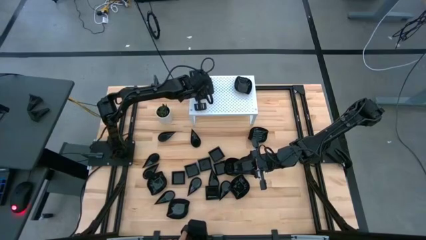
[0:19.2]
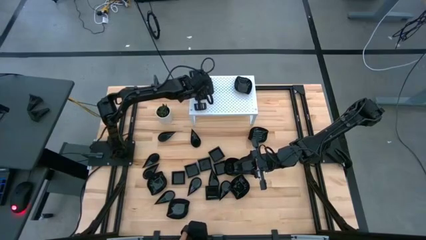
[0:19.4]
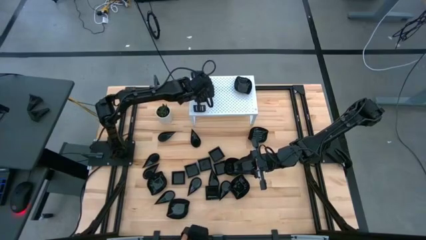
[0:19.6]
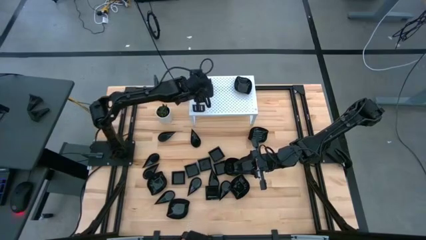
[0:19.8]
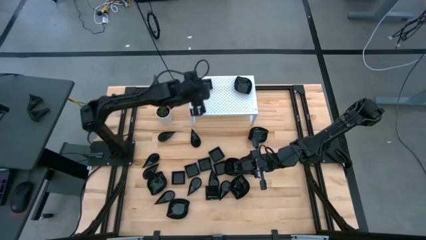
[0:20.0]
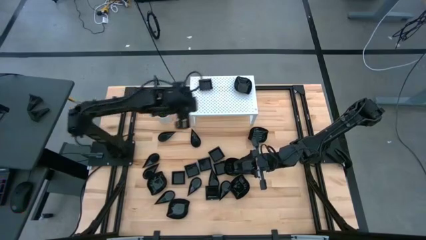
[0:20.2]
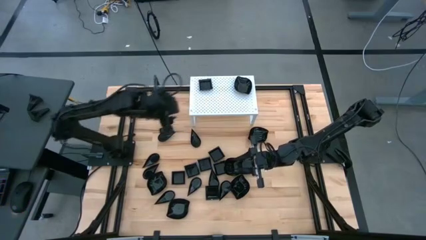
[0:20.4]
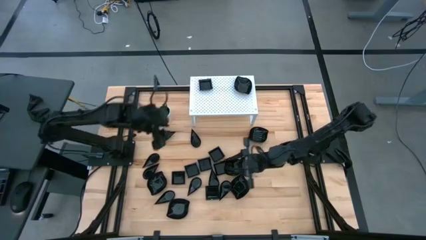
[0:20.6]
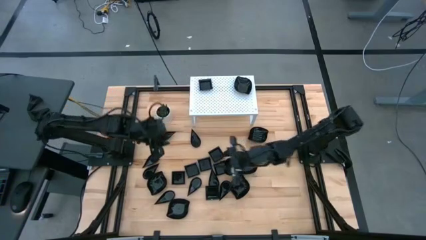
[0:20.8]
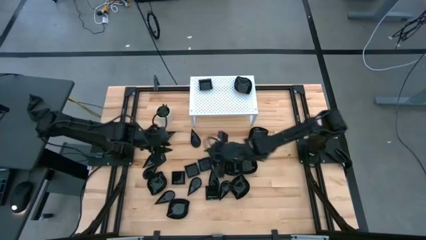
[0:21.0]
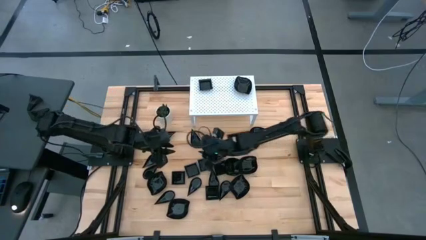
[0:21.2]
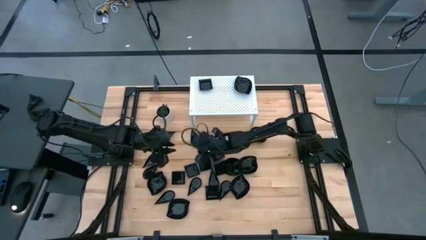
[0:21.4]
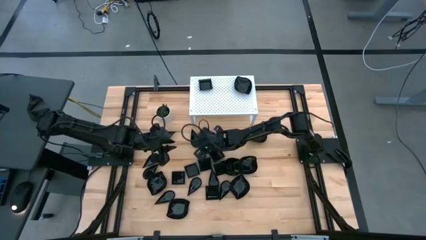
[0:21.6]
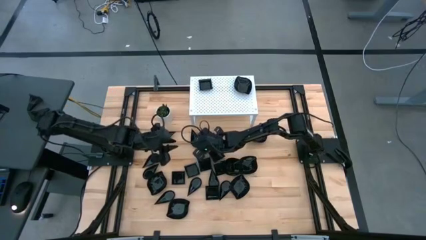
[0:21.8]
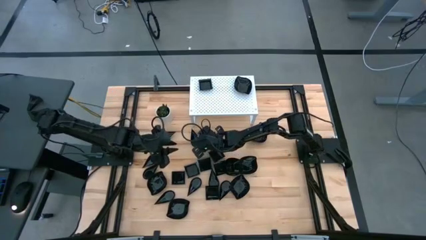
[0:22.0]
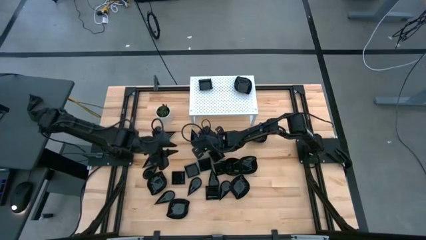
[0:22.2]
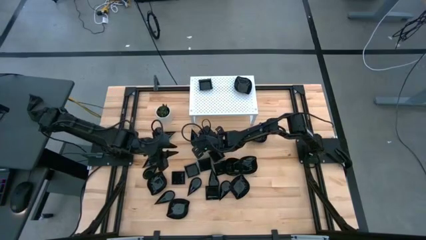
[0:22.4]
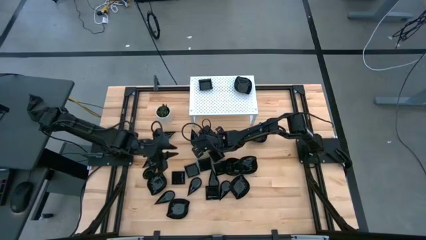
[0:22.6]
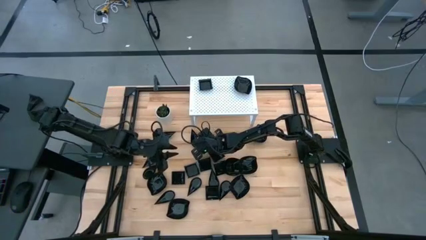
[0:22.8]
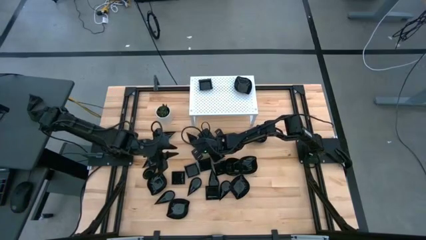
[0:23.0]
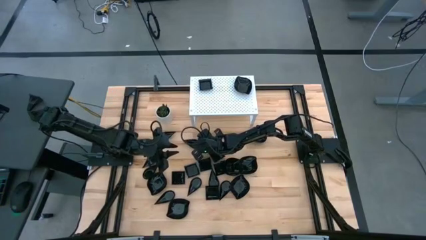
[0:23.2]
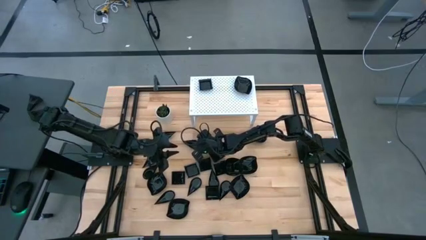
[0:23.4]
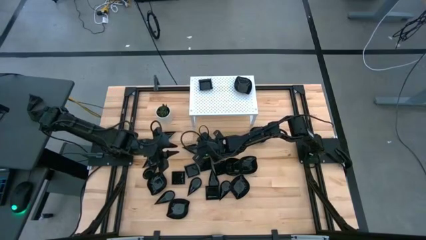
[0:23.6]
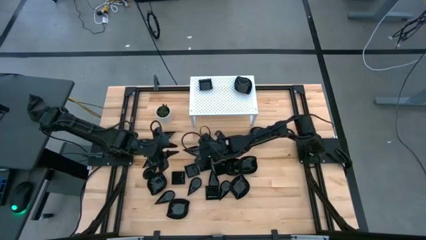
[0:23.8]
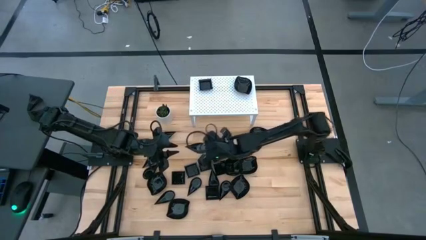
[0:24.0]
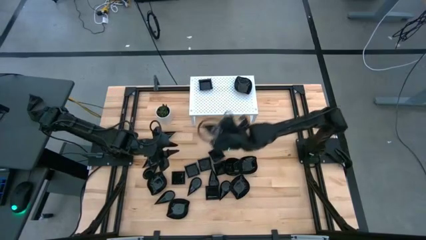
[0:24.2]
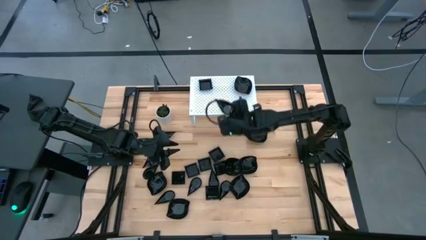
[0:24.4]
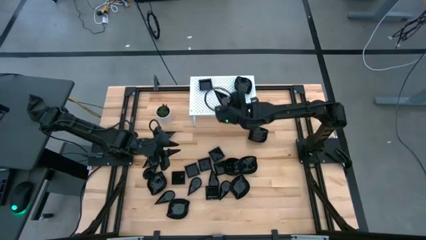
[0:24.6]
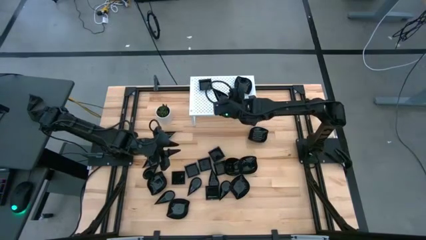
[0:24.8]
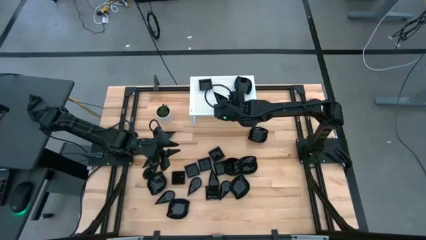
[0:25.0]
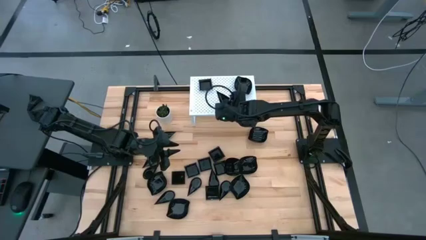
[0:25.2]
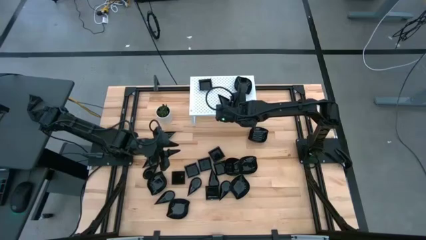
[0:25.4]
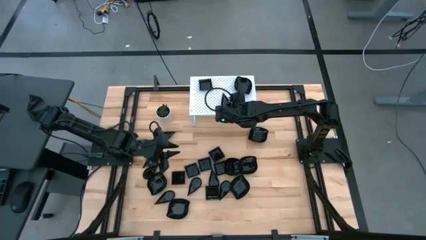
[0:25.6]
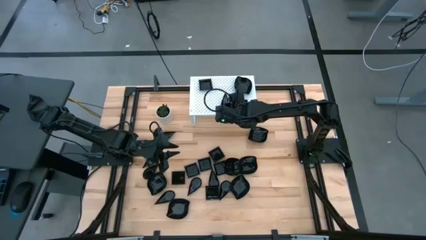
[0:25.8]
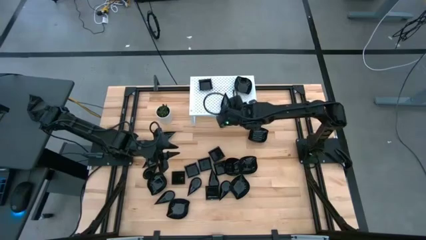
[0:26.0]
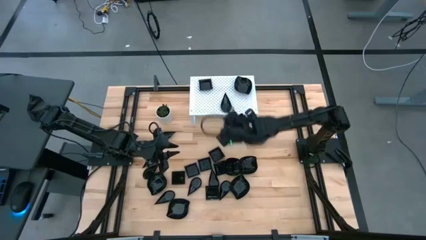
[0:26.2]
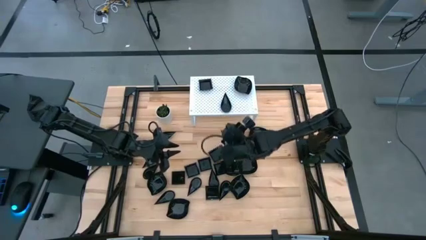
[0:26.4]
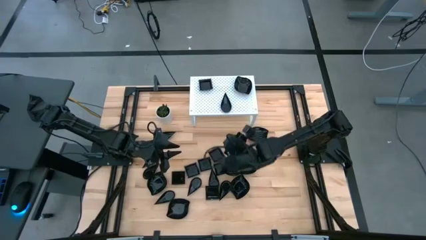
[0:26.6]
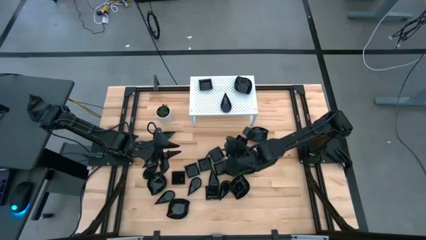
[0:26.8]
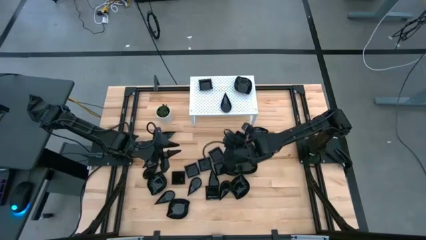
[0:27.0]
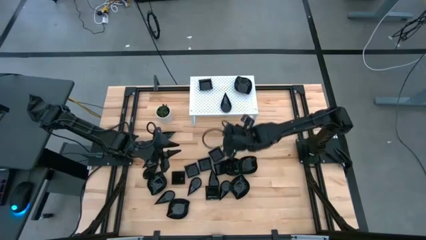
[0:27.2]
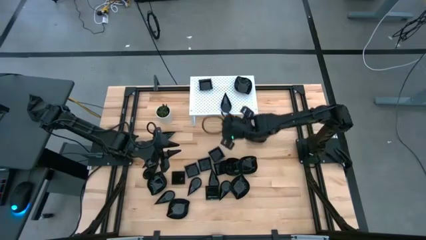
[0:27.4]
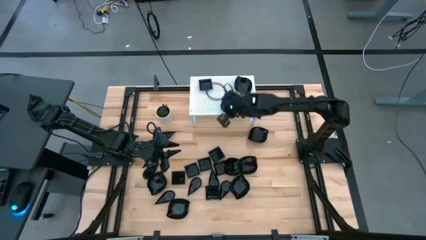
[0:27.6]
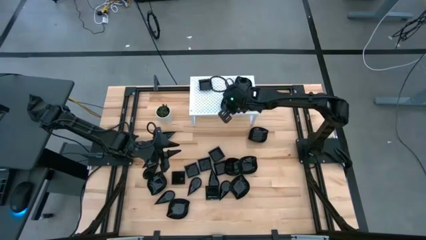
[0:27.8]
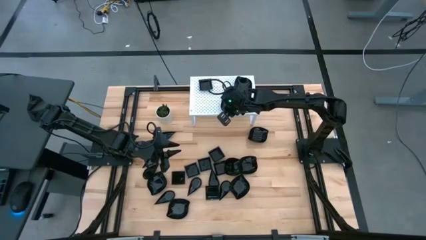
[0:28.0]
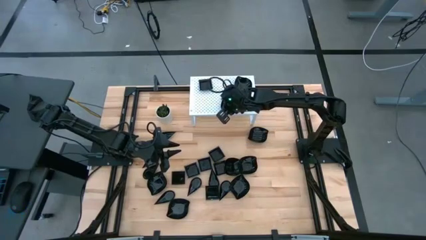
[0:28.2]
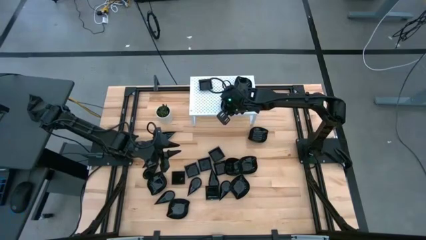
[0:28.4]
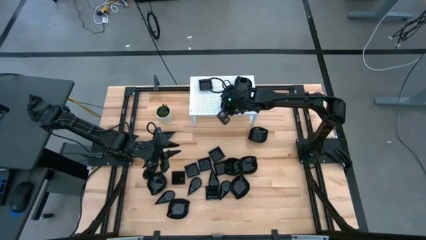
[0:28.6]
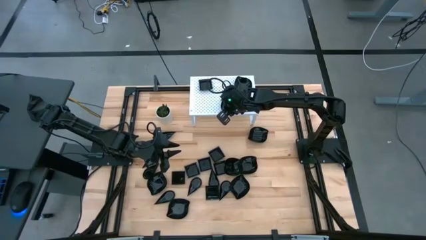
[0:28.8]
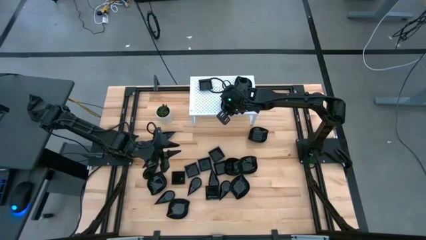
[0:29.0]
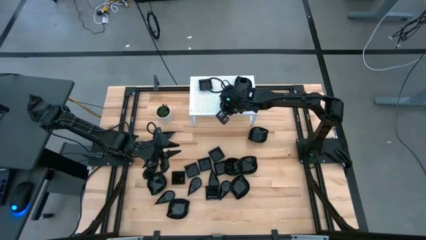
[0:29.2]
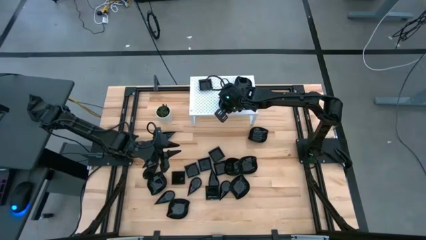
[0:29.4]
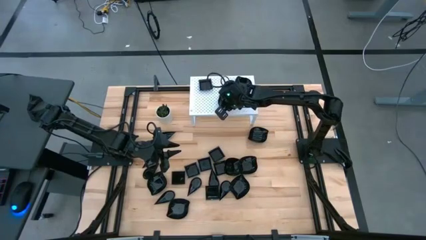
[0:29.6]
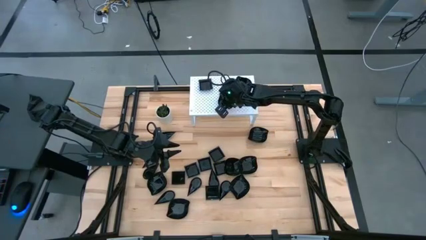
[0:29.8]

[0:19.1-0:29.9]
Task: Pick & Place Mini shaped plates
Put the black plate on the shelf

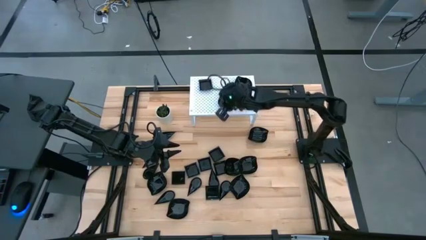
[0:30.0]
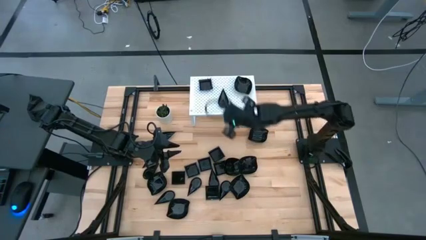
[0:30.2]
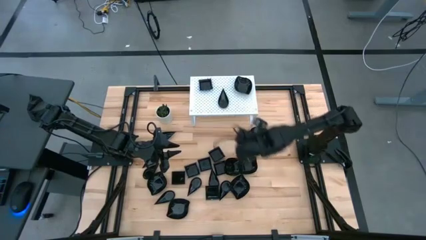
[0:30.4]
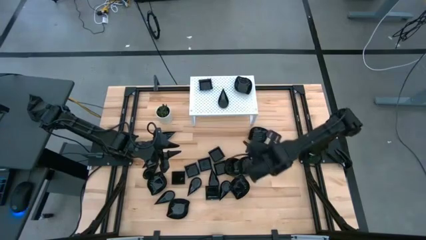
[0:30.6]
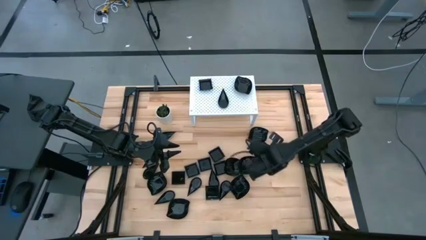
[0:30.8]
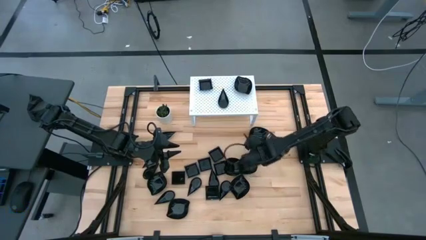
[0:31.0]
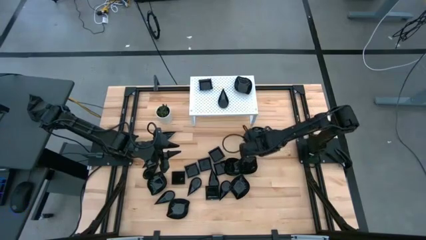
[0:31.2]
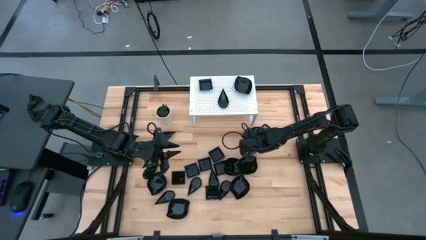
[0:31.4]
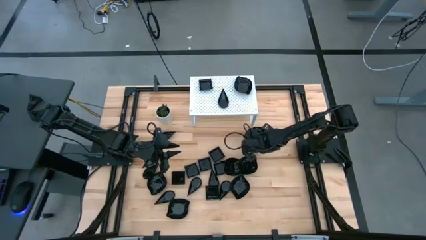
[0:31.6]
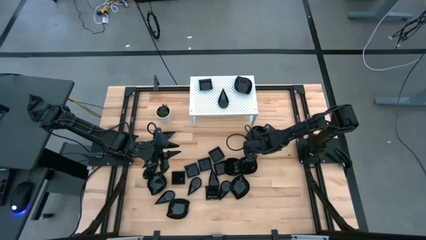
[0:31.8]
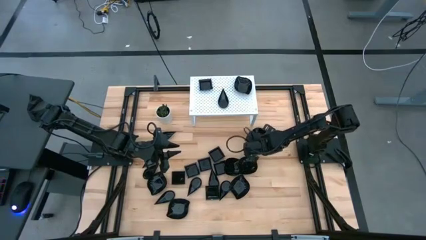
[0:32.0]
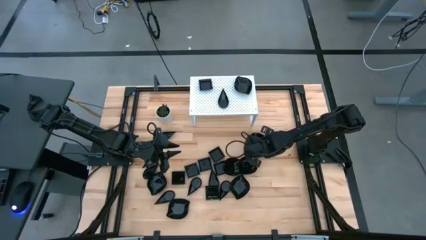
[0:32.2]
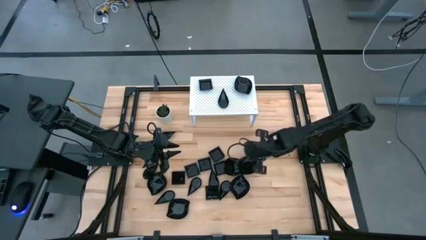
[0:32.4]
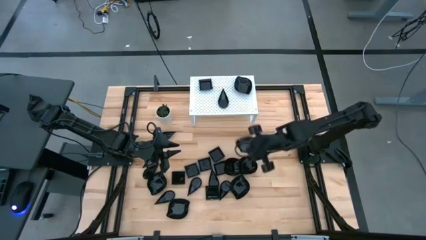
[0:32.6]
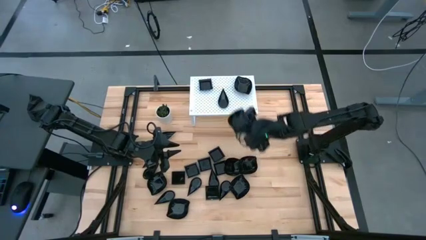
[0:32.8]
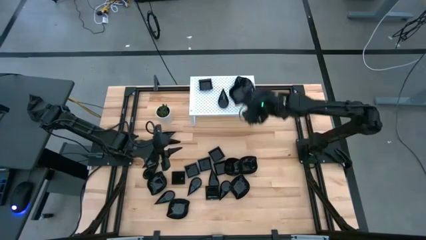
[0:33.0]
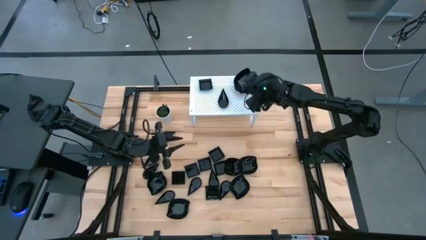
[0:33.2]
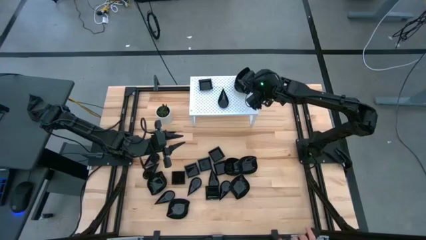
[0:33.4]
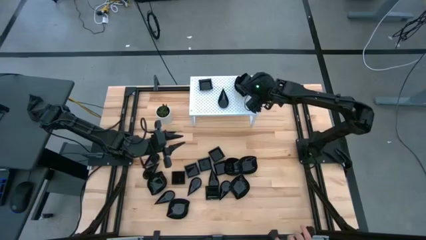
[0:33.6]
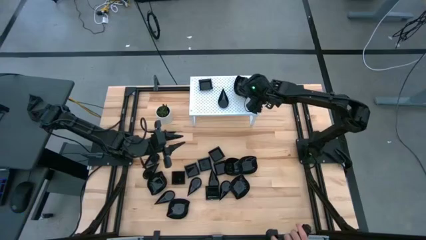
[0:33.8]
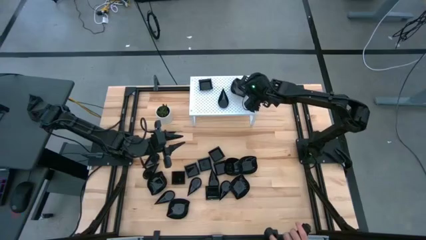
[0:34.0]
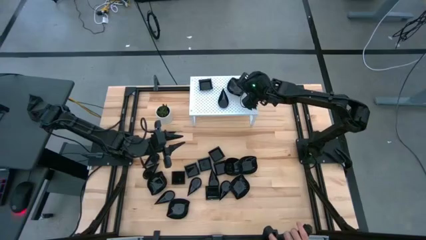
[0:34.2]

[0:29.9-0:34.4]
Stack the black plate on top of the black plate on the shelf

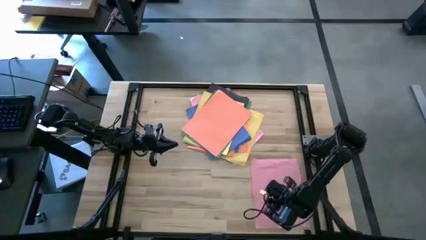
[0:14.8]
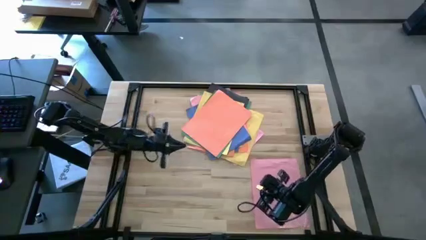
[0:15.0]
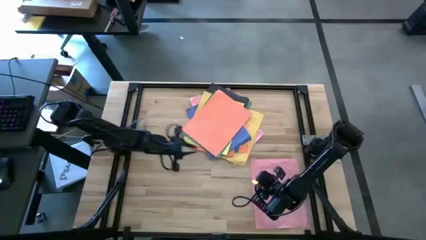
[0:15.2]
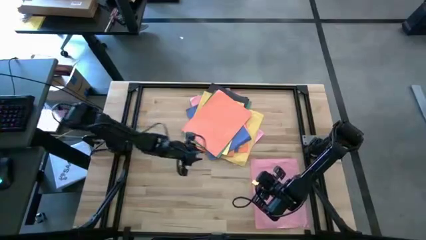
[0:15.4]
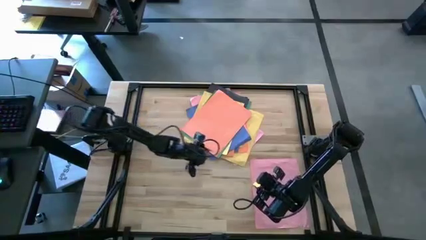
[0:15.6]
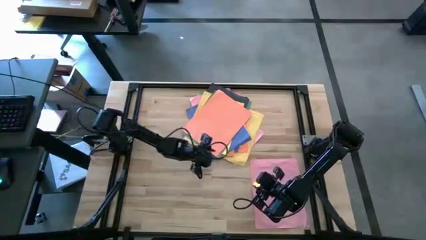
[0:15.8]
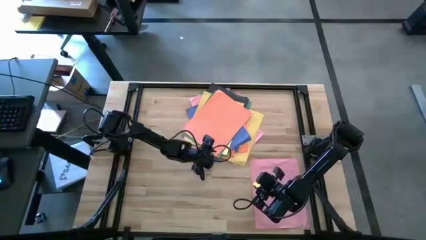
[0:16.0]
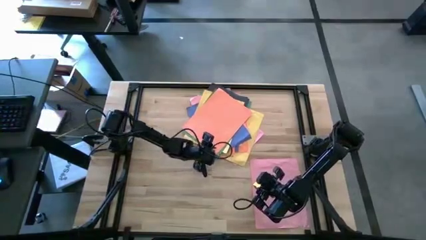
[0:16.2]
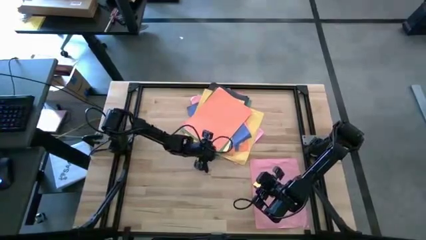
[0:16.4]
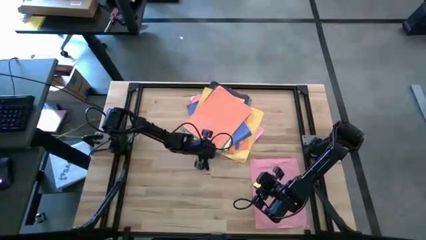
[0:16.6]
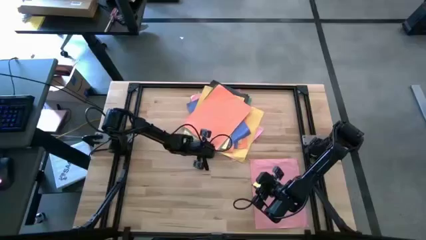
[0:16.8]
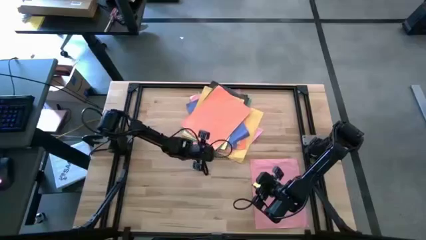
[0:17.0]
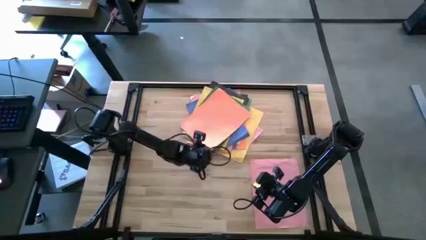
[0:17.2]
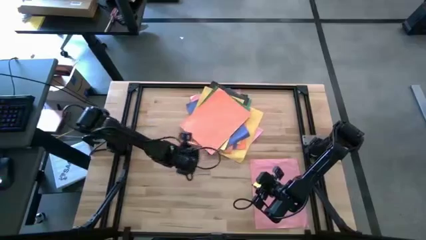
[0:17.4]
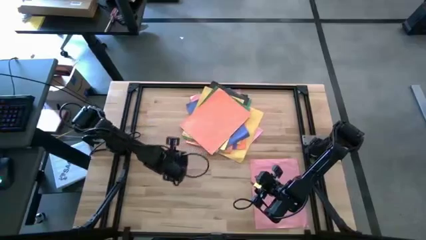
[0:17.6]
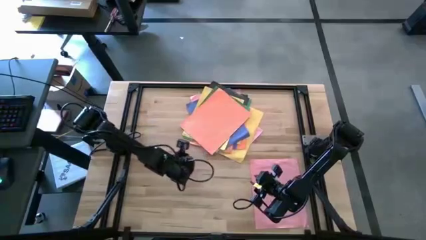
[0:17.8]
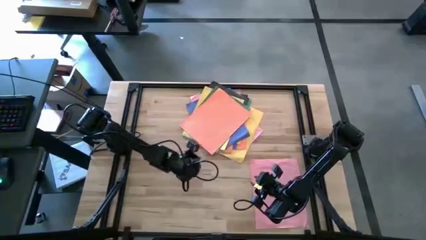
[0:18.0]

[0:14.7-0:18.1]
Task: Organize paper
Move the orange paper to the lower left of the table
